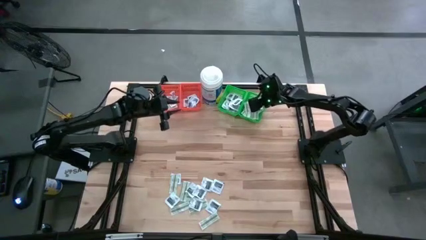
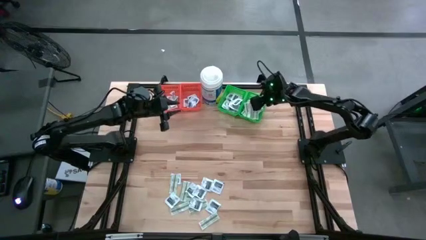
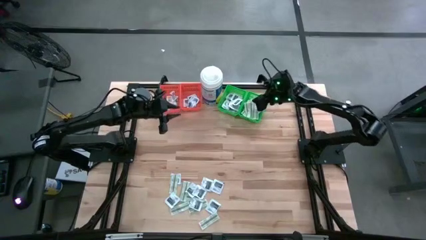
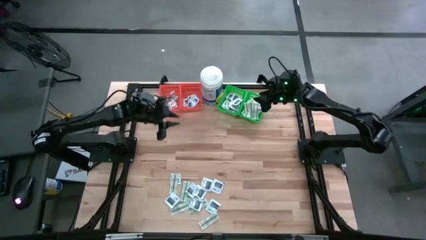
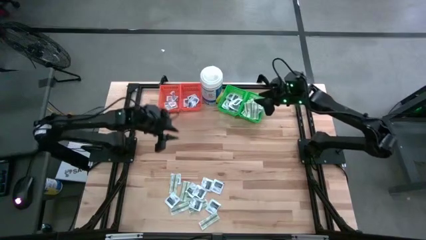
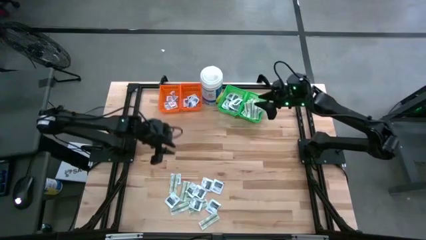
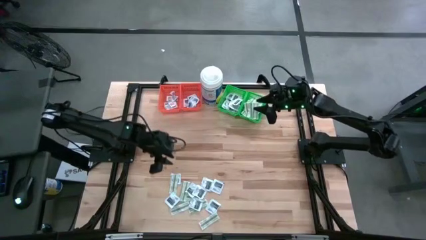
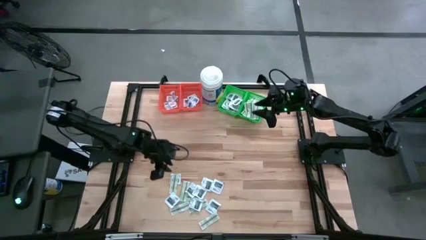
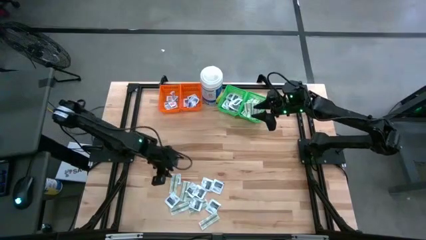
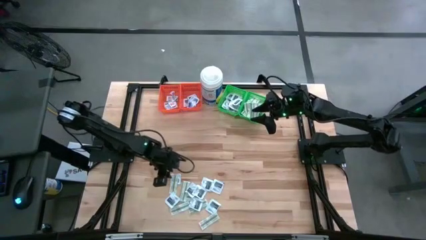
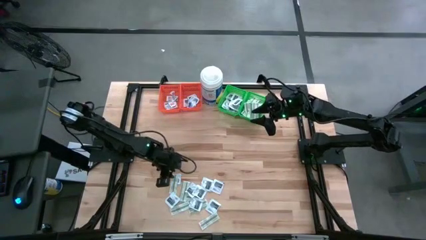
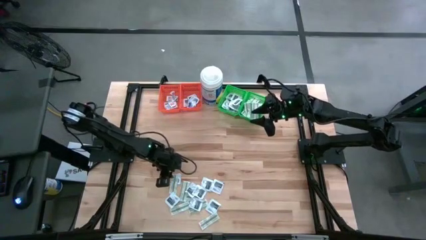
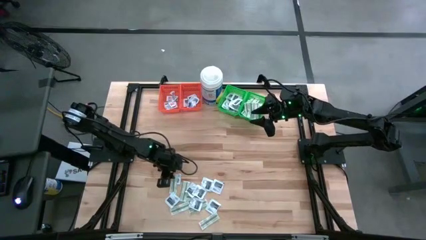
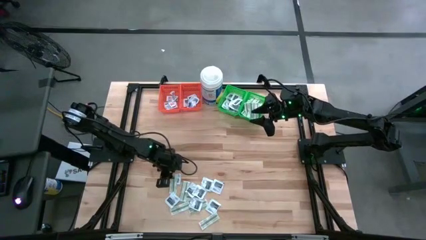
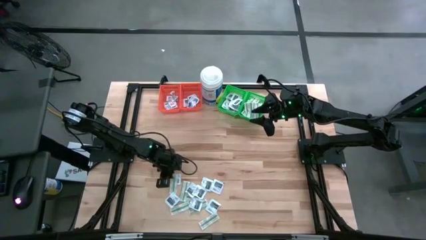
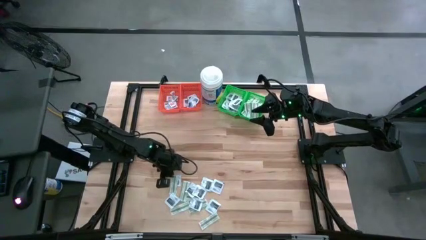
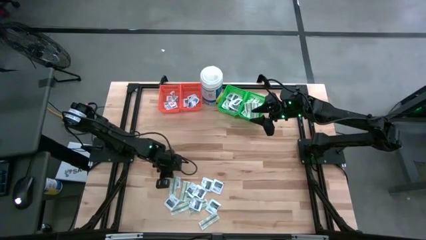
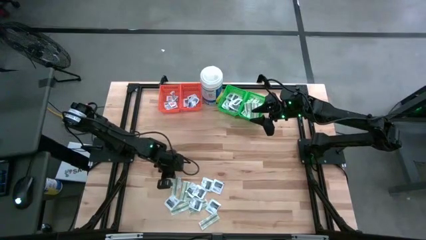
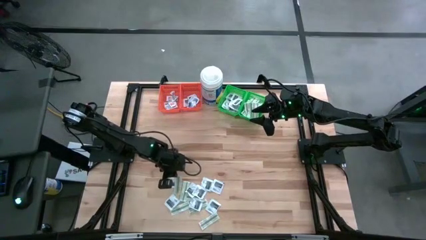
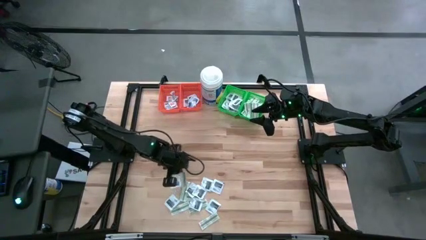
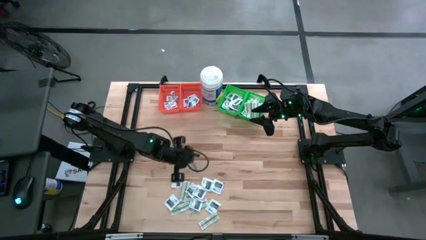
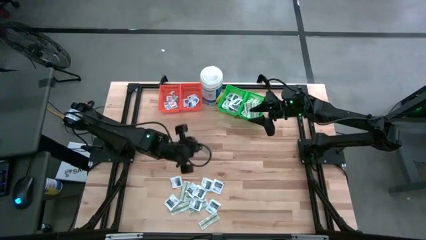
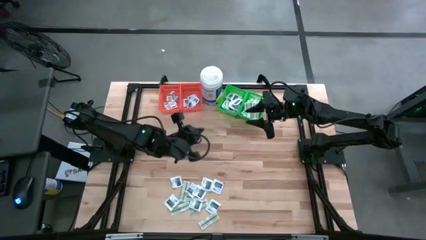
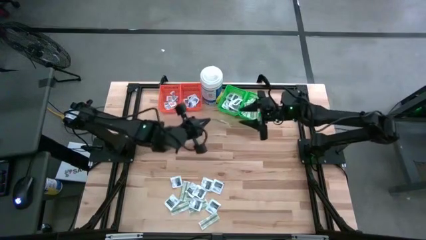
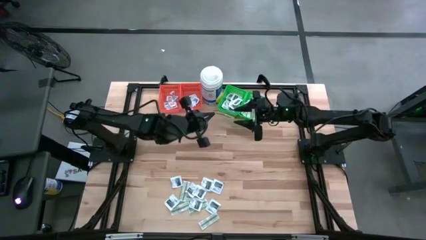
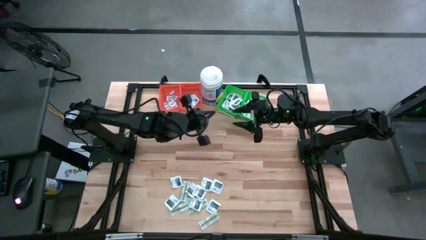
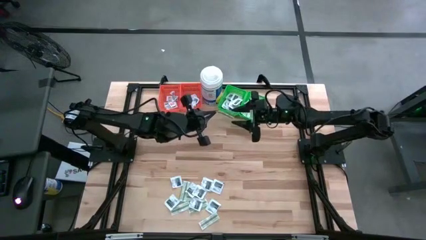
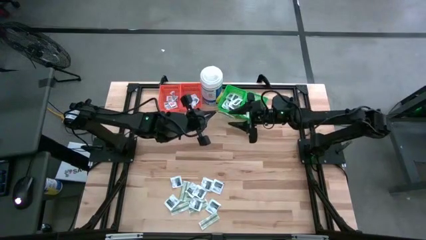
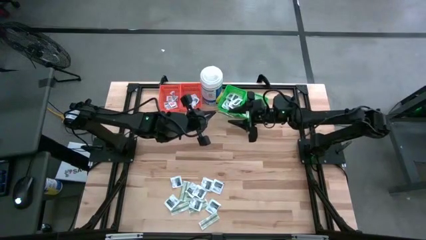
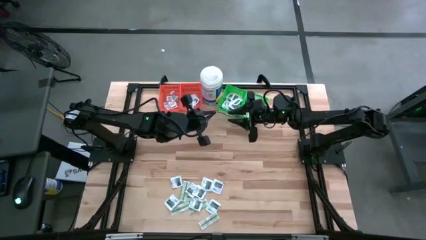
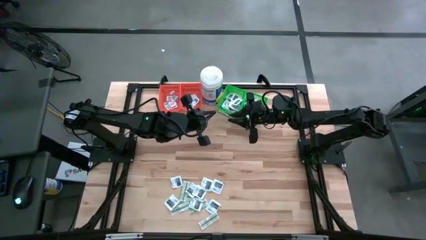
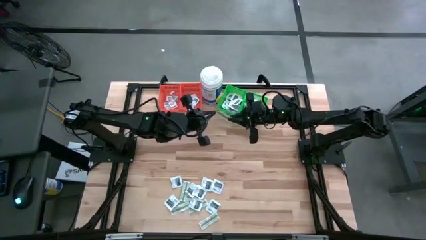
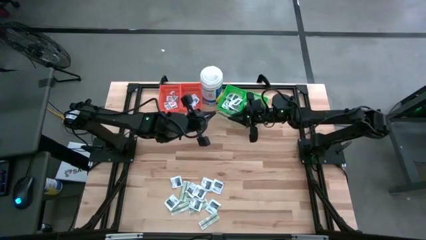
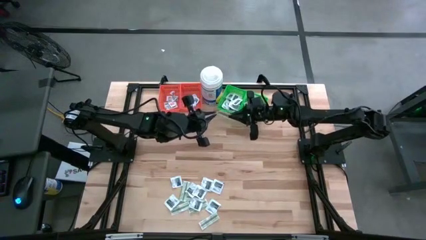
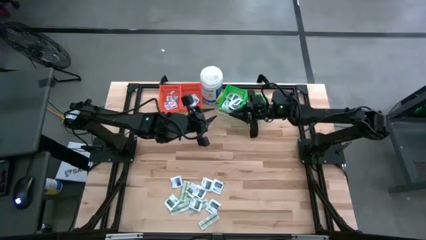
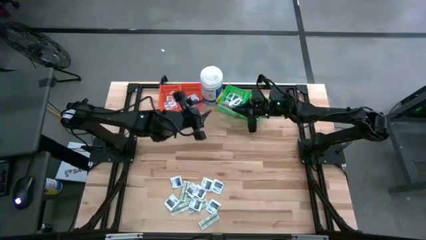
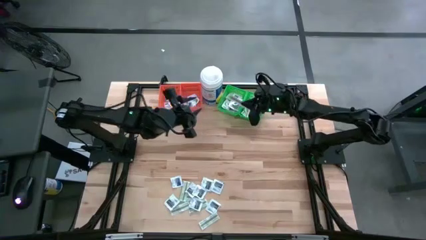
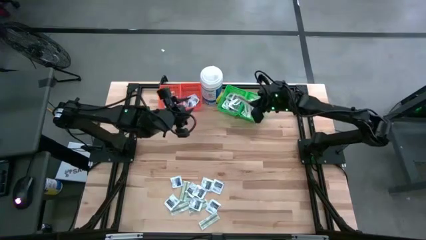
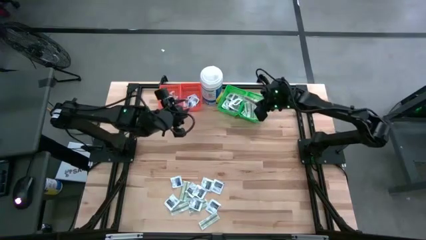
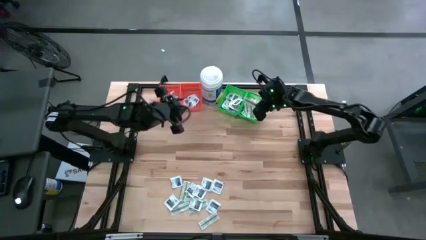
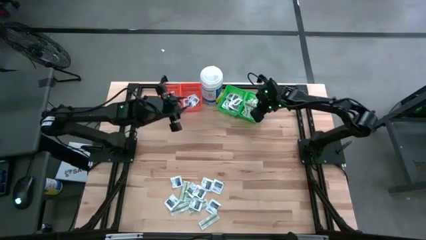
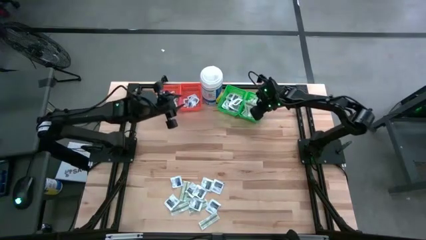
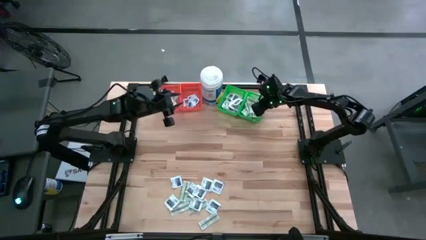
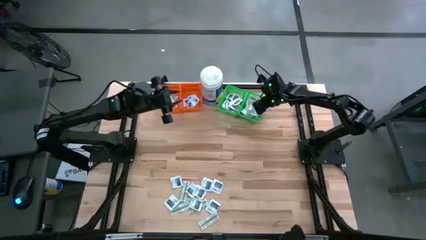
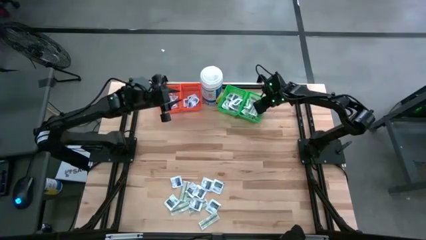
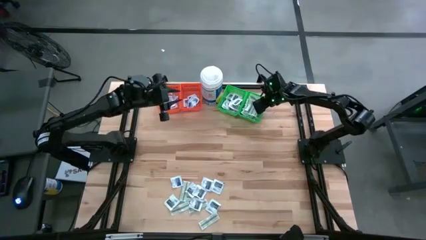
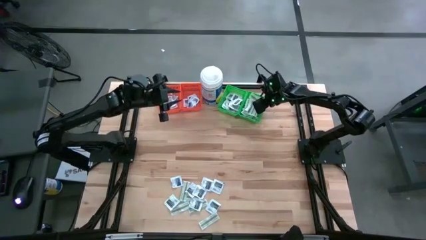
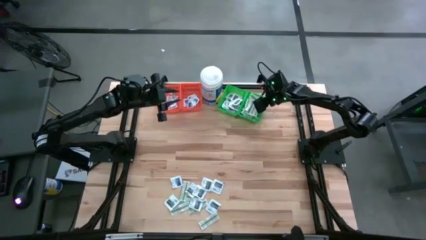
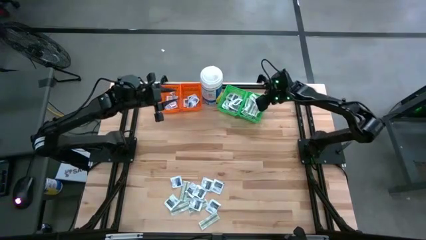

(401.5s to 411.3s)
Task: Pick & Place First Aid Supplies
Put the green bandage pack into the right green bin

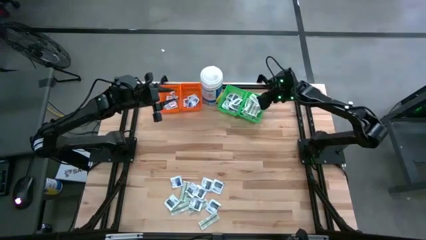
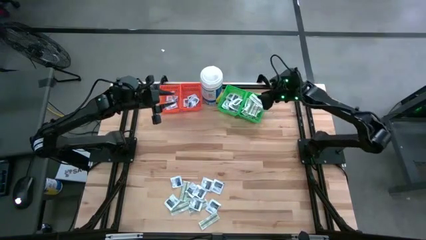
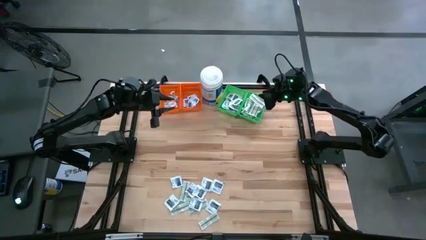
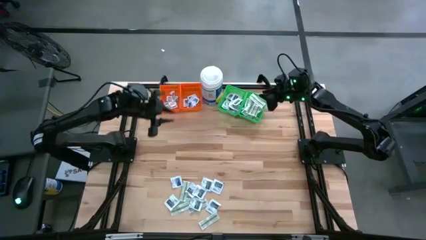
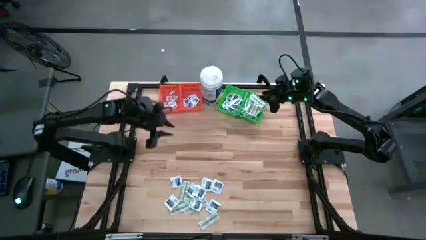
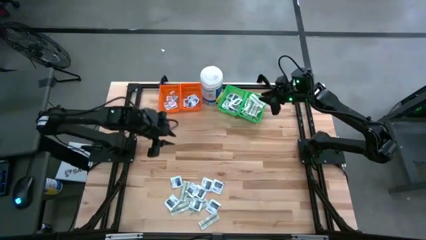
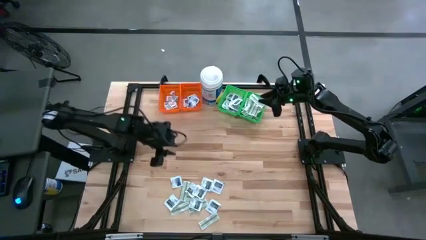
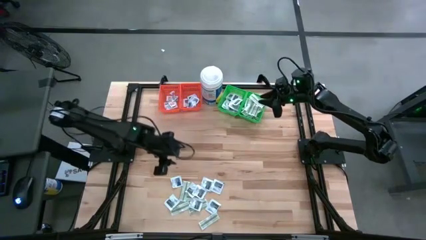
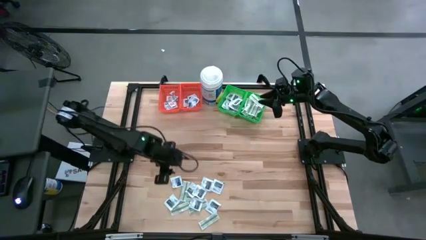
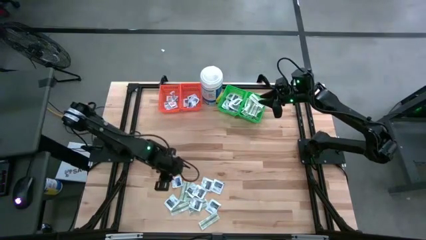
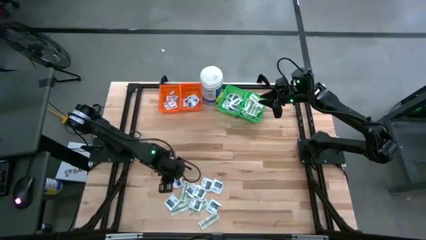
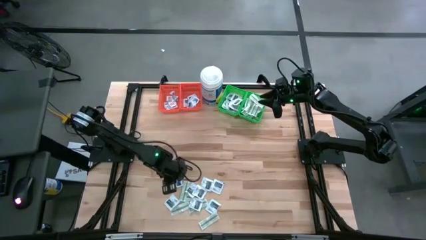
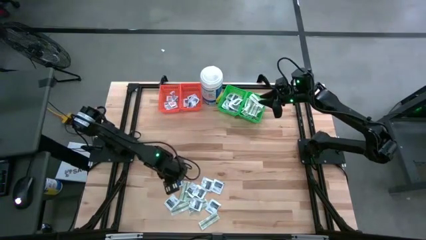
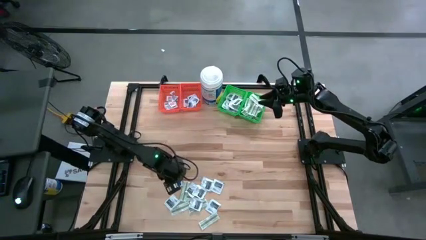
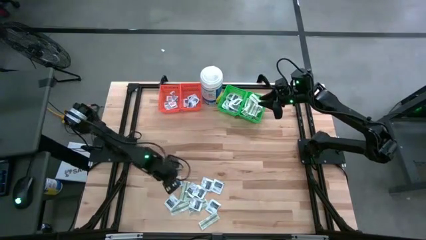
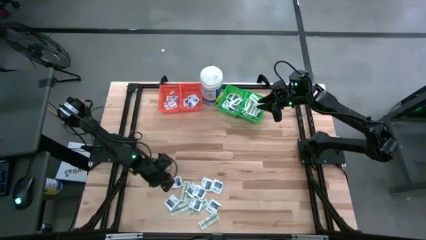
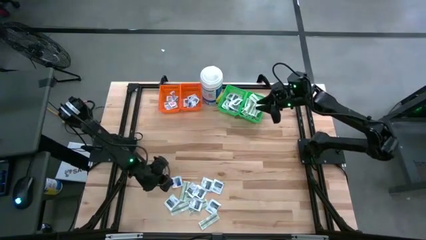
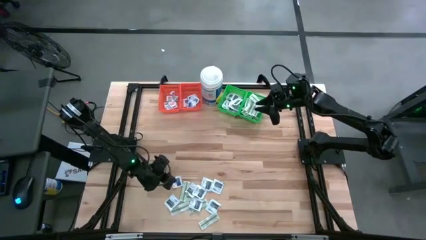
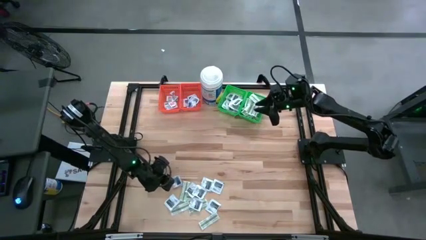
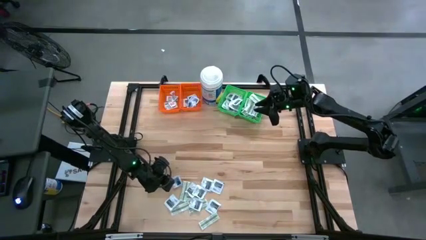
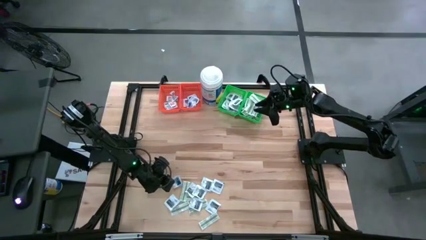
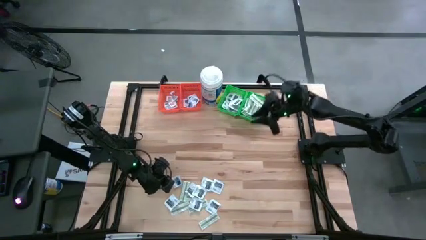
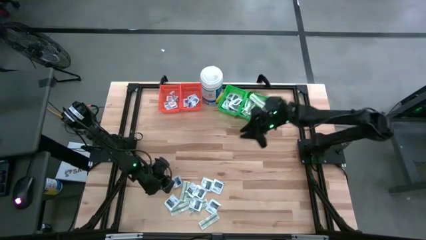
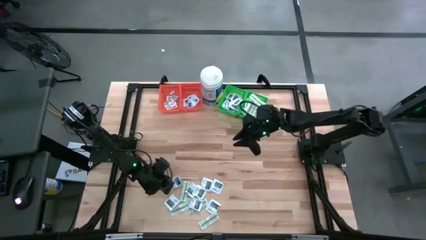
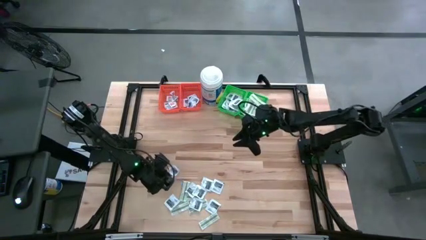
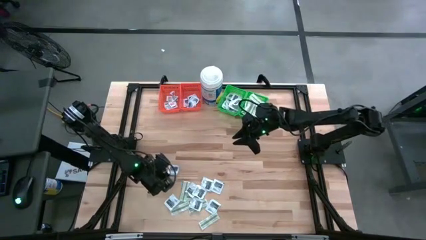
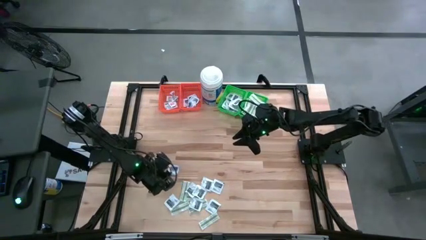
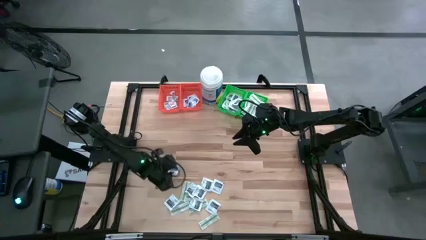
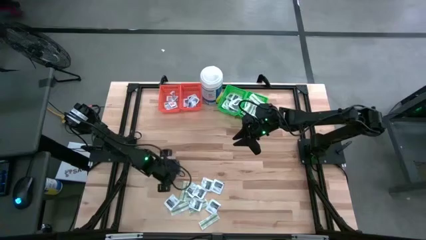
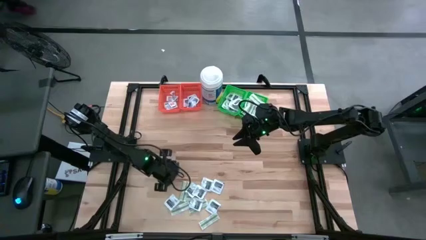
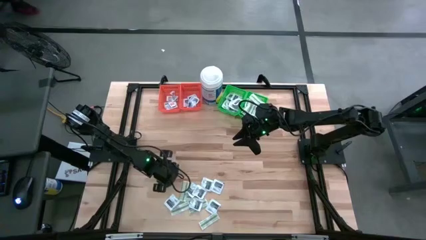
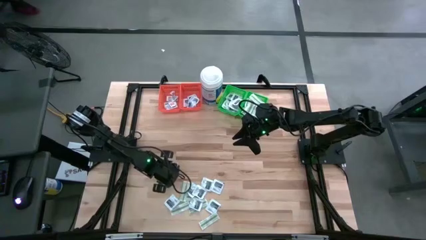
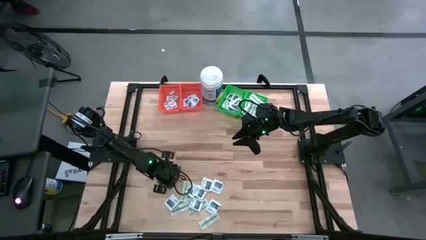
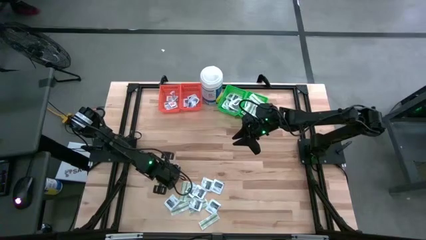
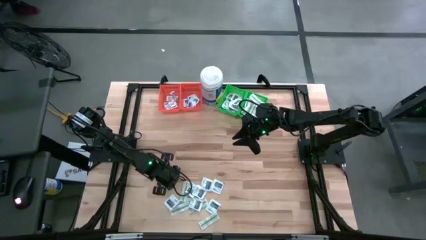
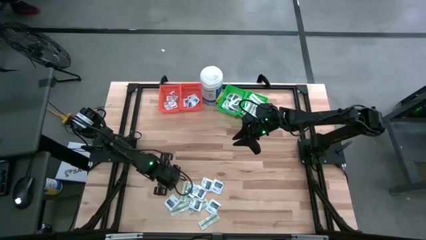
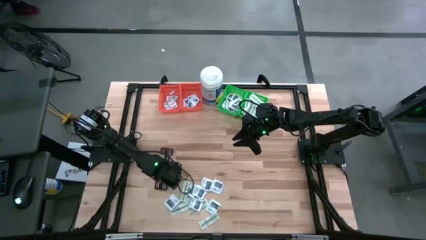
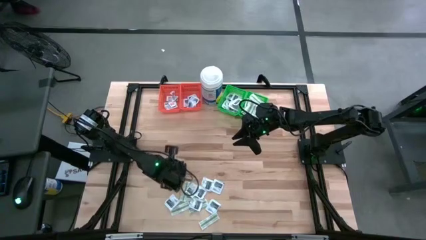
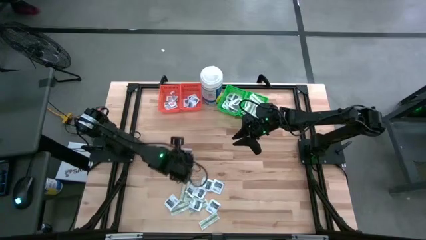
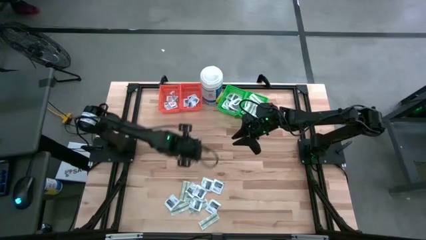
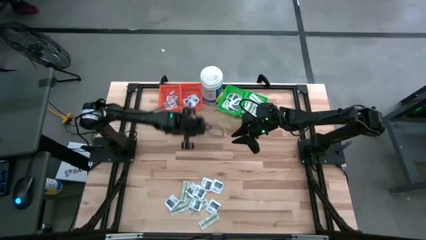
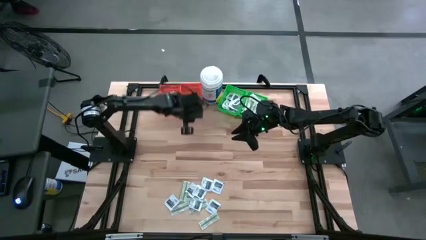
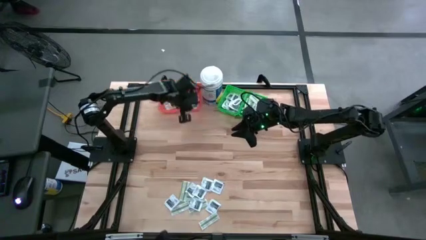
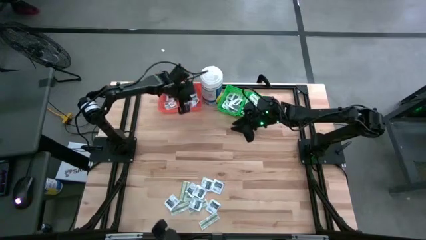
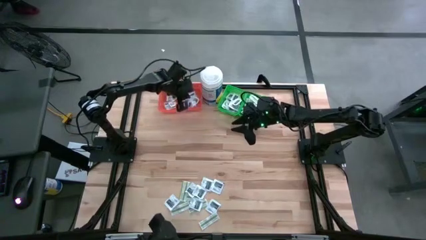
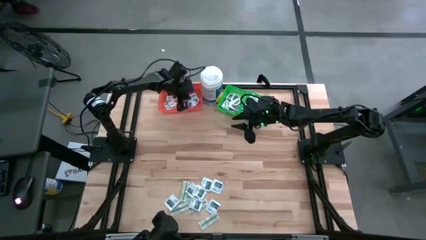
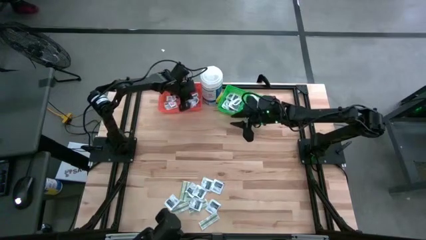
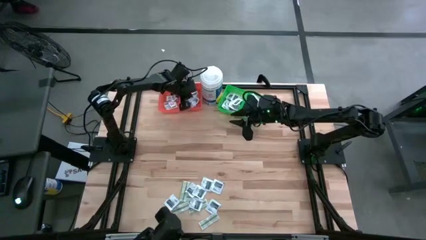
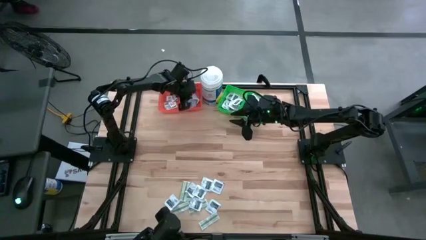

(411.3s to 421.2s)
Put the blue alcohol pad into the right orange bin
